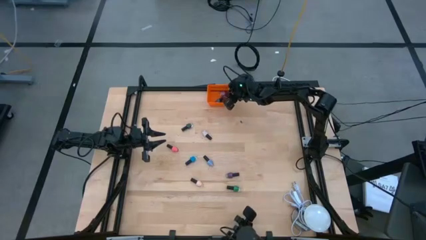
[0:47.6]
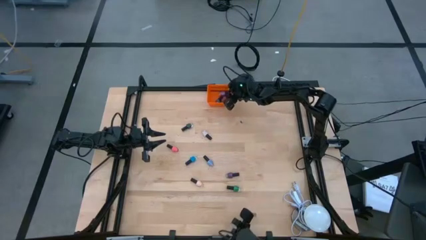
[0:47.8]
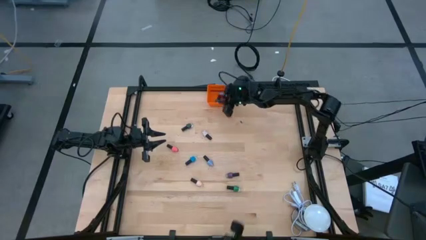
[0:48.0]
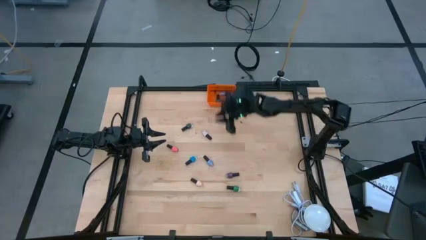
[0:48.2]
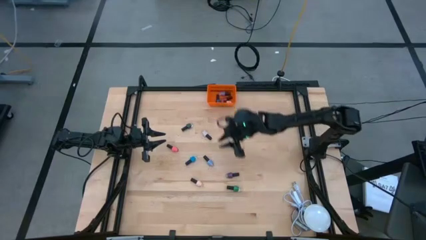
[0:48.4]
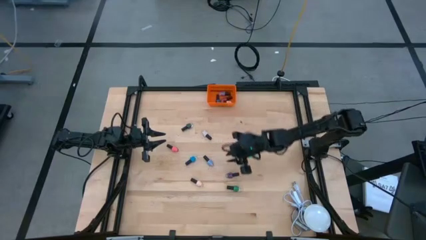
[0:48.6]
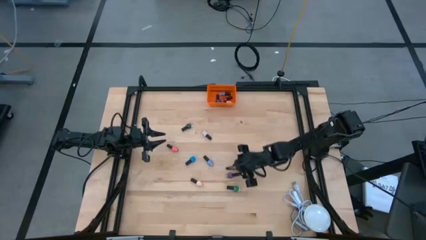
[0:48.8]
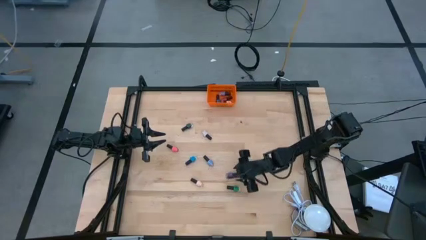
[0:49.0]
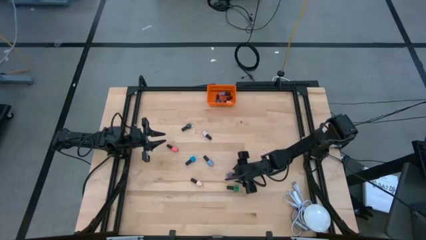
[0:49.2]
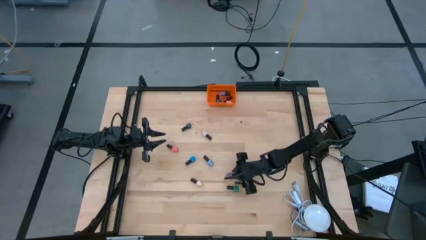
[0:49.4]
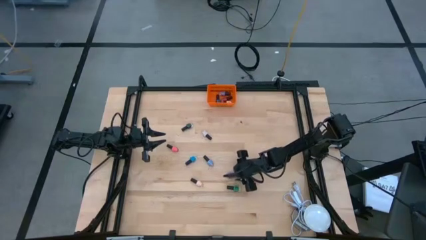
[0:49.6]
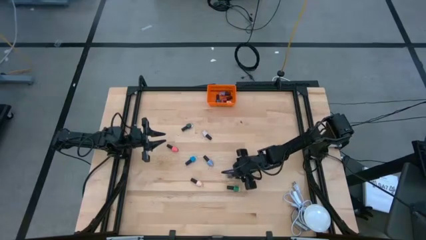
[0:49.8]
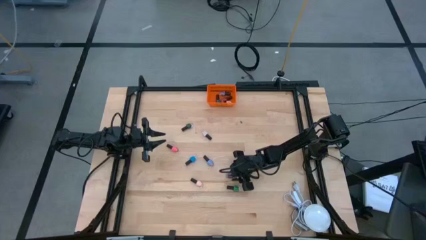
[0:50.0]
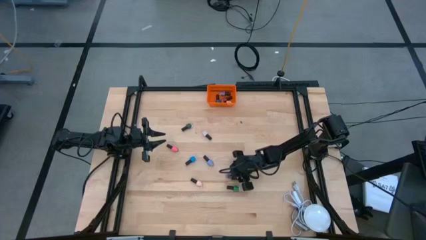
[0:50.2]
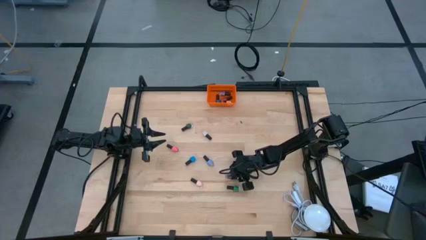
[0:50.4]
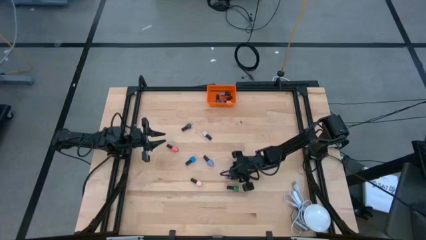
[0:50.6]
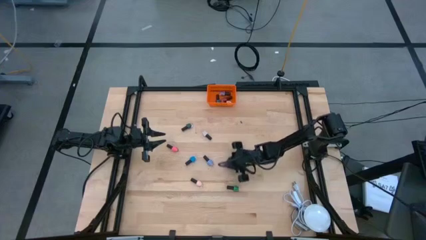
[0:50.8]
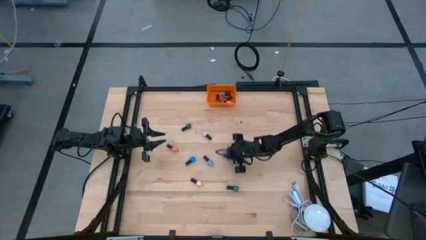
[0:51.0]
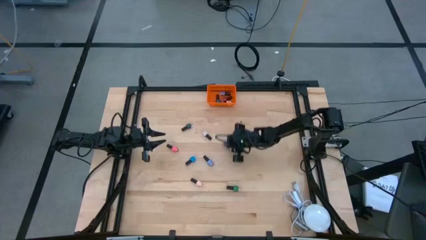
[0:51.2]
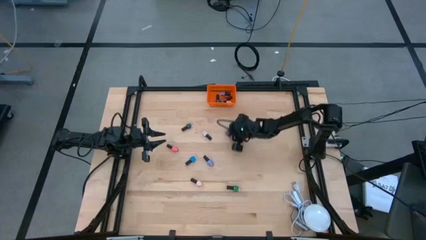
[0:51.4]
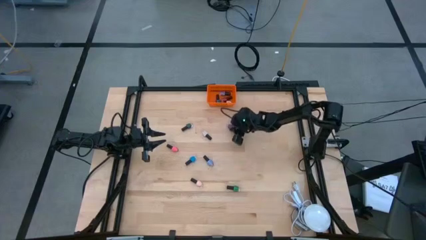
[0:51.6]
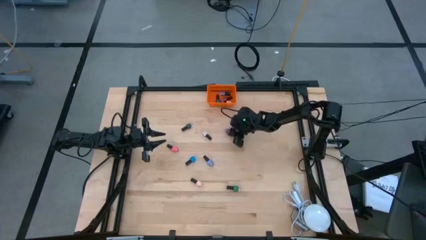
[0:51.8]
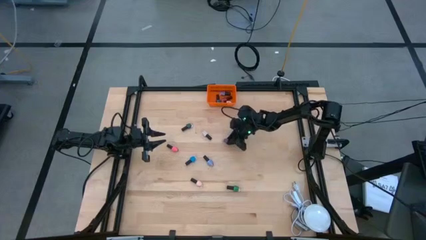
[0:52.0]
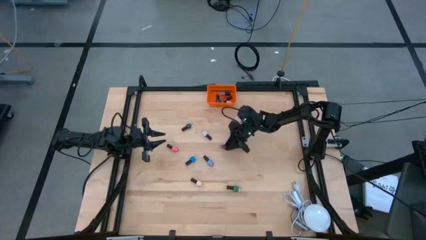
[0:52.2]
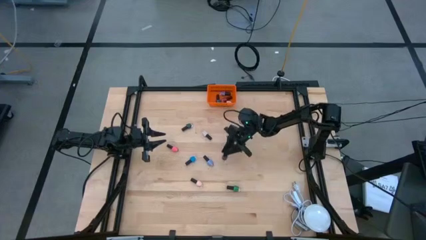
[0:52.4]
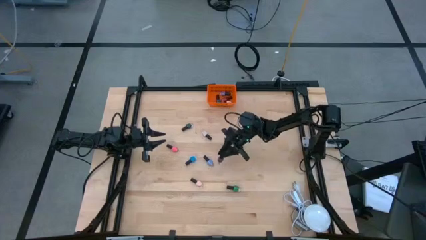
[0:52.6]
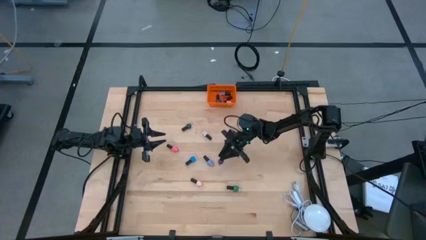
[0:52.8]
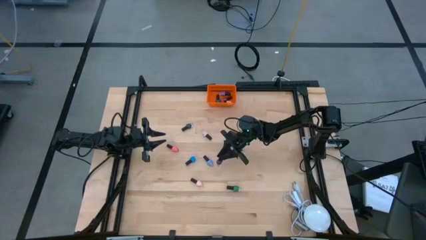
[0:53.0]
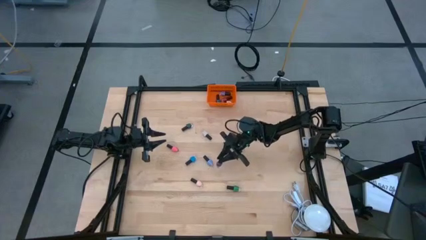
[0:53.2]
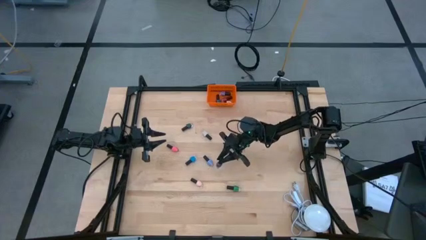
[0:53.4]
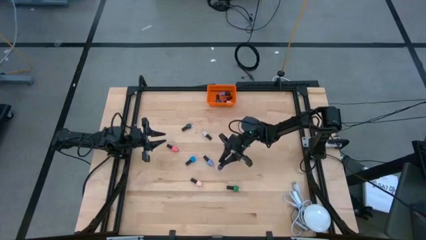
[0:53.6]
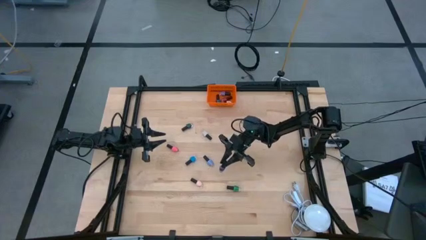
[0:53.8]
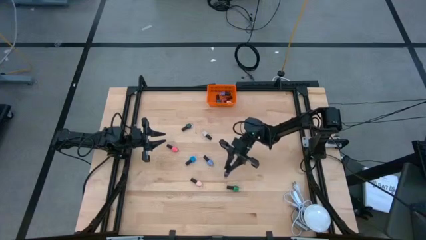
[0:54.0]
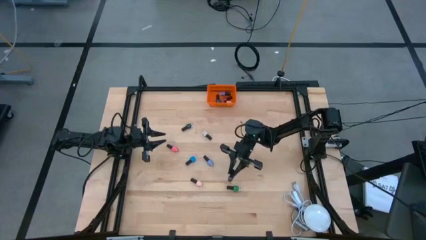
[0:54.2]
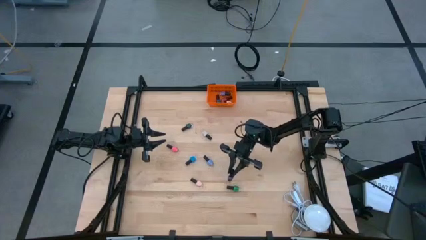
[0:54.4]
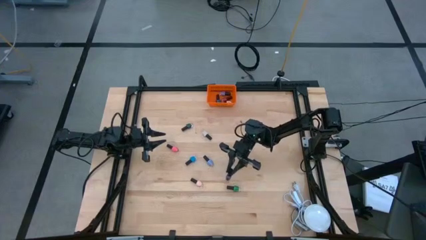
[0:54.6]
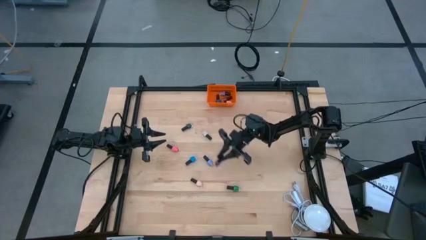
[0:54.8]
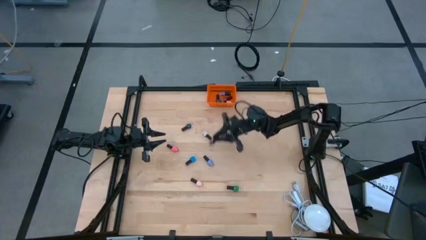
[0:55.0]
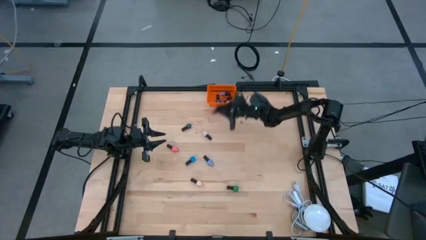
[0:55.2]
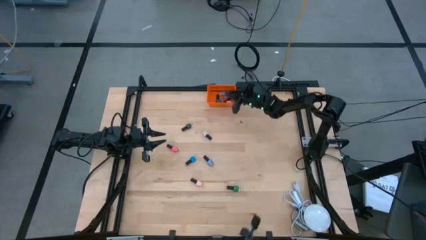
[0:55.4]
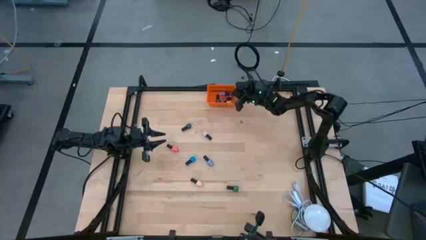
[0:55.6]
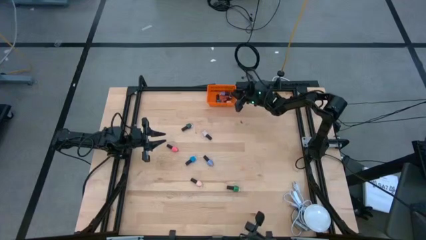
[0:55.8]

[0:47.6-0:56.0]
Task: Pick & Place Nail Polish
Put the violet nail polish bottle into the basket

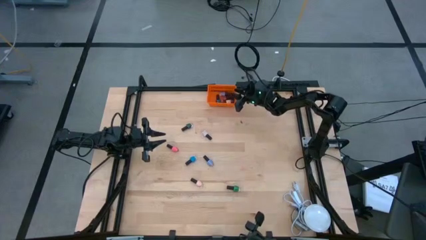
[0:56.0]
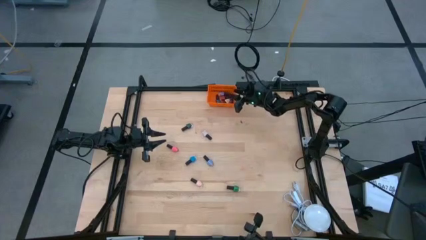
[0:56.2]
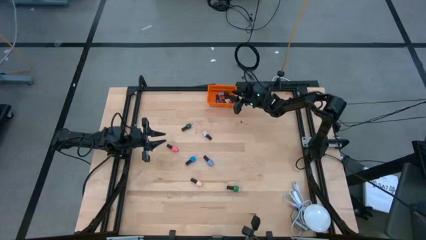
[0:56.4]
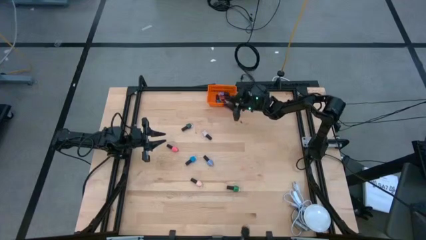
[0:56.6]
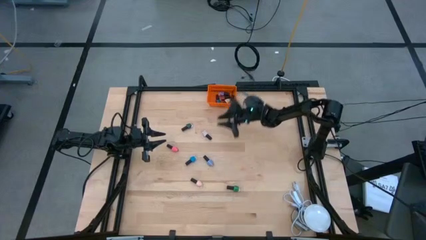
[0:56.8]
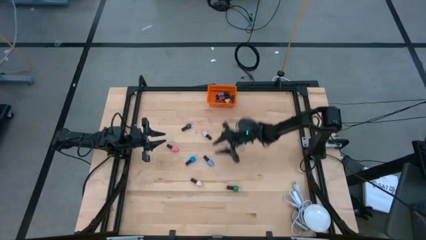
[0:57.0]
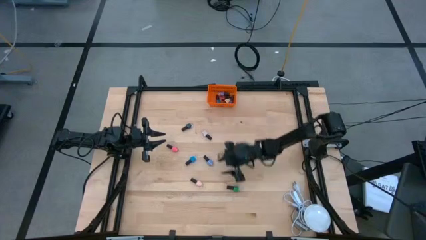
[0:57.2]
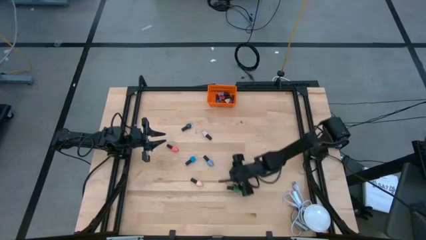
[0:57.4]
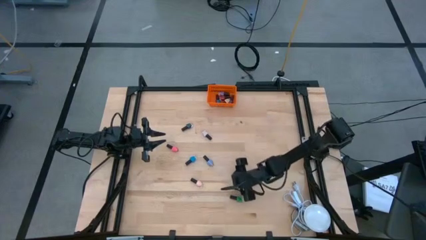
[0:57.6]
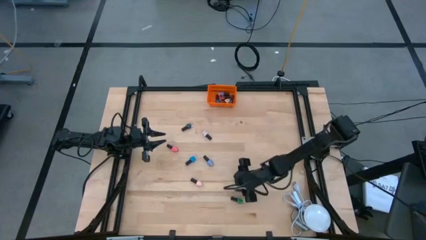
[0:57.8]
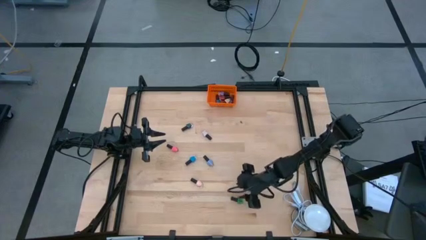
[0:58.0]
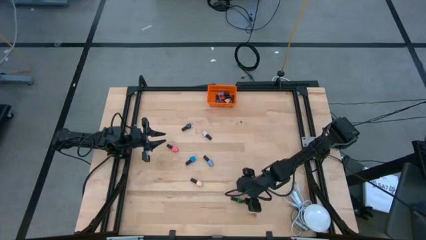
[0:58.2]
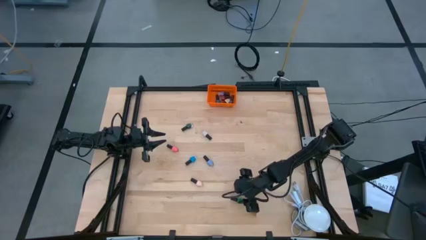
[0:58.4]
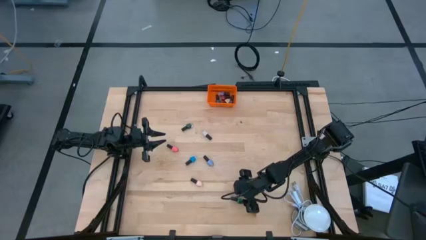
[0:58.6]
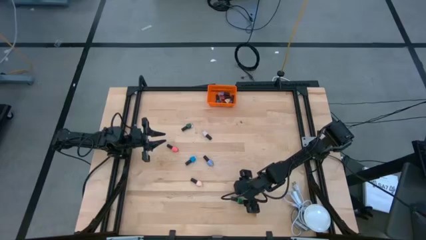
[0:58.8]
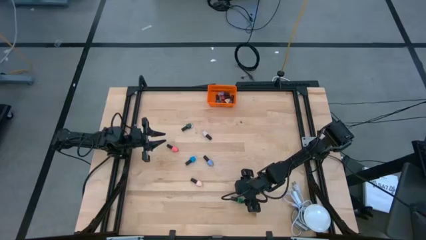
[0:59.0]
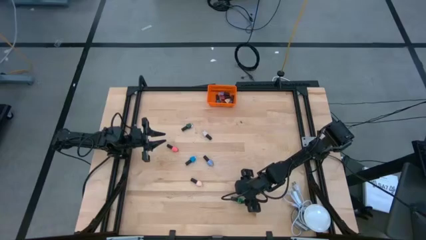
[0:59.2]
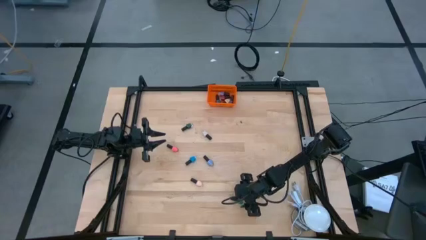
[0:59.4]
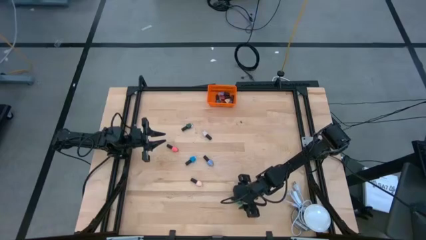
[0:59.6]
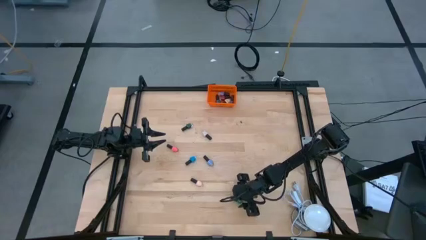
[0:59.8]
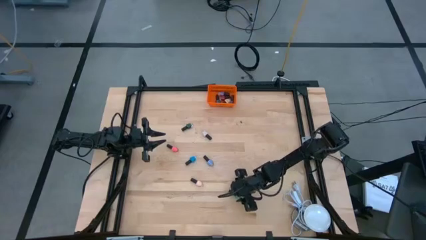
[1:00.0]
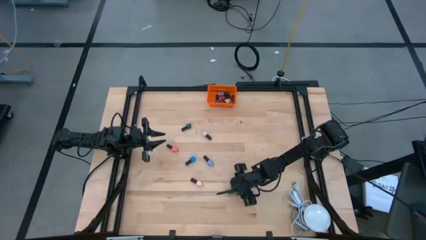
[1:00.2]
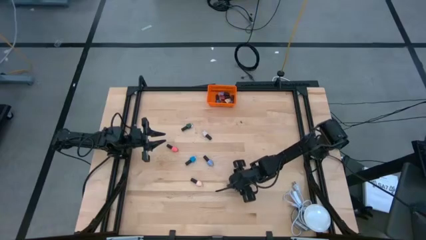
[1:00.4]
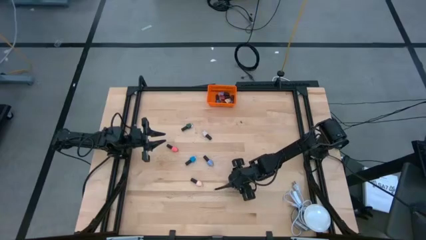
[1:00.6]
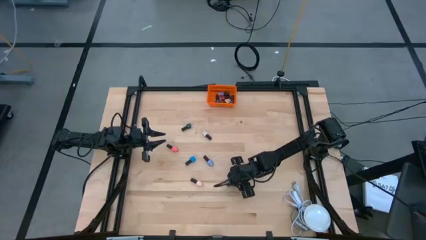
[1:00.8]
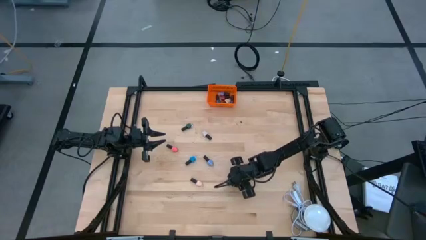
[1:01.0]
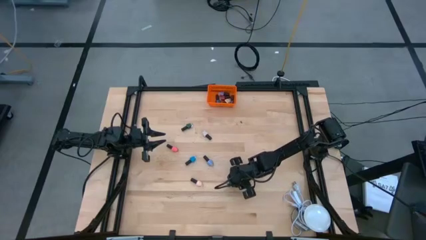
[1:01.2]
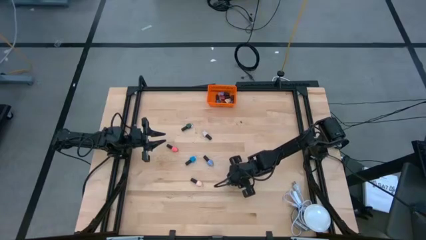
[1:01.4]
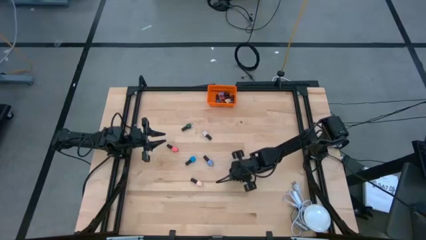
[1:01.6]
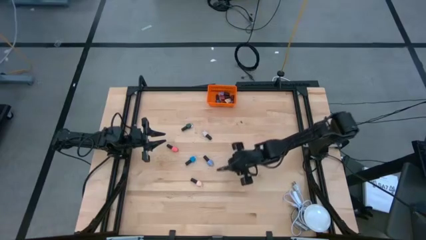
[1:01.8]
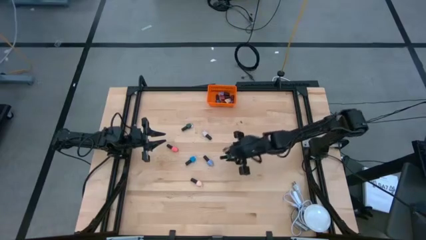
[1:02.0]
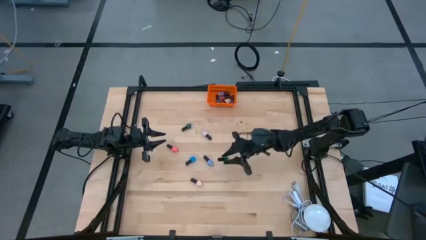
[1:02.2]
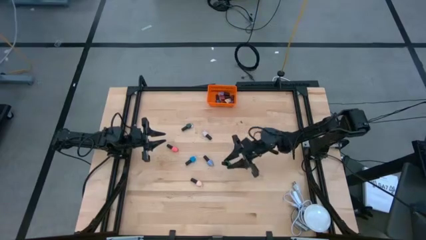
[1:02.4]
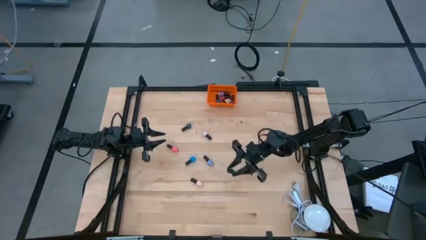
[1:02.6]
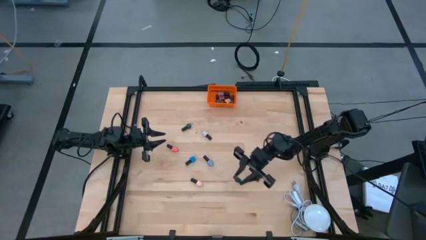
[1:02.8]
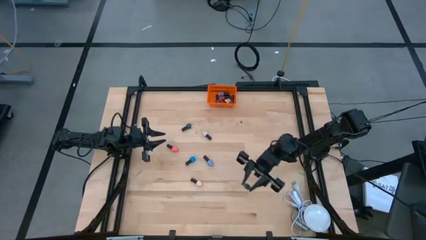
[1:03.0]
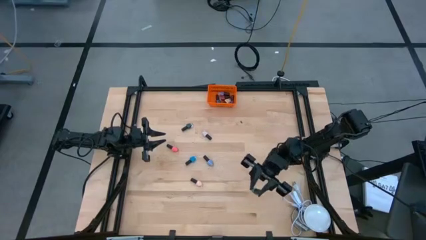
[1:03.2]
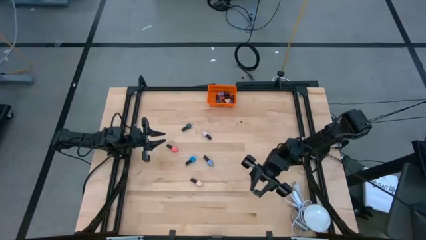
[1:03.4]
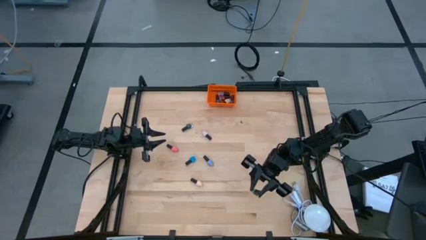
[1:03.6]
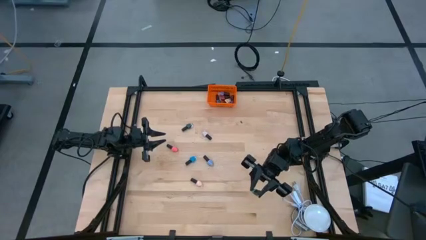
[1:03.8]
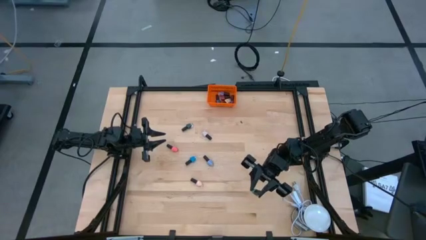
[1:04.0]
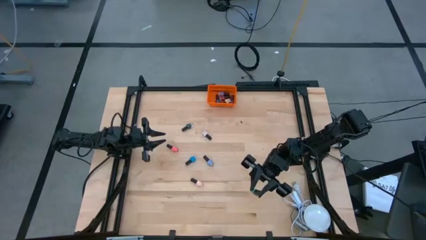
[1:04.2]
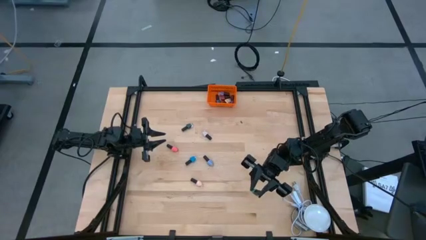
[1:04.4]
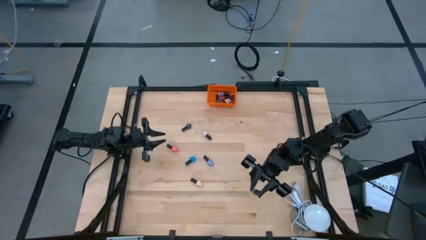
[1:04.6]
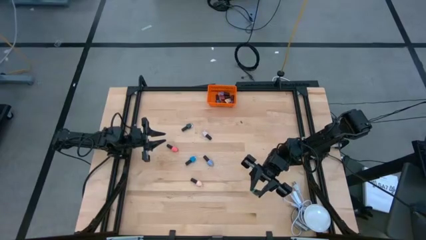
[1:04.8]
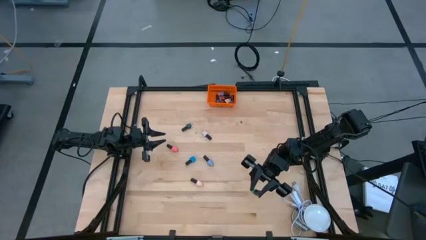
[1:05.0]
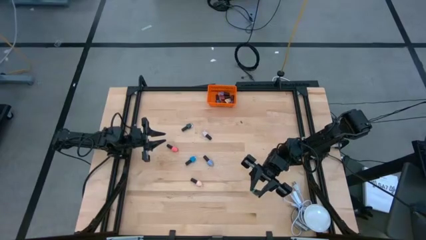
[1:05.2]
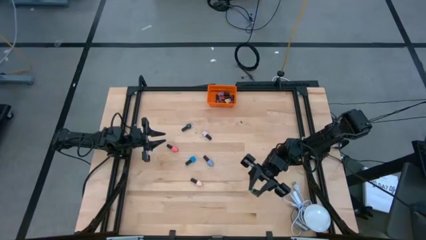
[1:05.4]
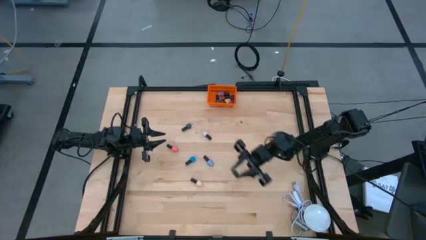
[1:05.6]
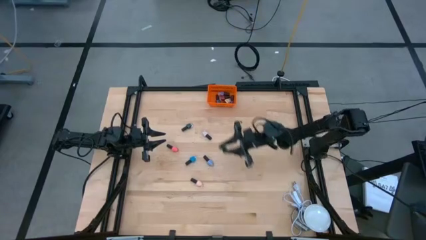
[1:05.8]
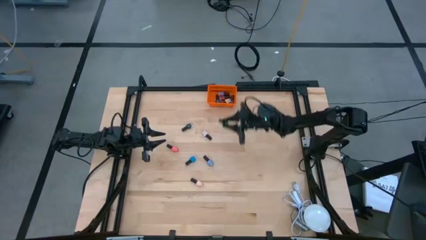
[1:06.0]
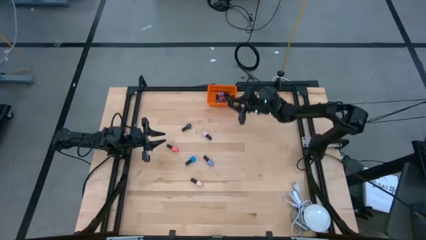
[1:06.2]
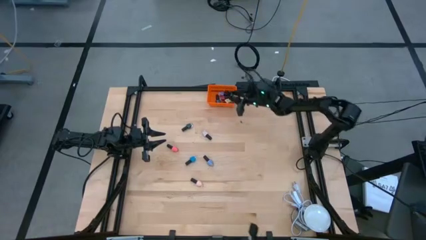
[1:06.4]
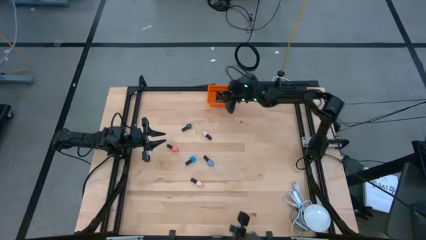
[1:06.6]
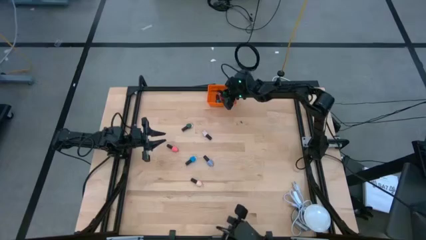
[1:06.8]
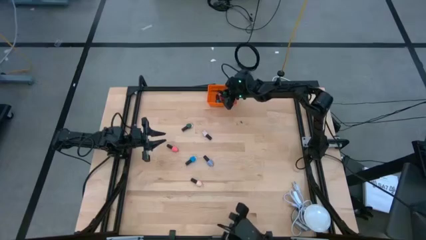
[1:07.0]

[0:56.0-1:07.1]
Put the green nail polish bottle into the basket
